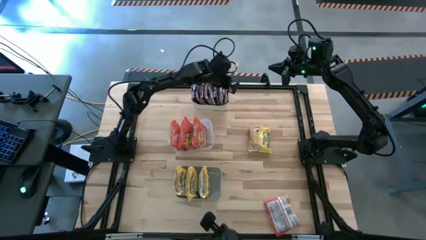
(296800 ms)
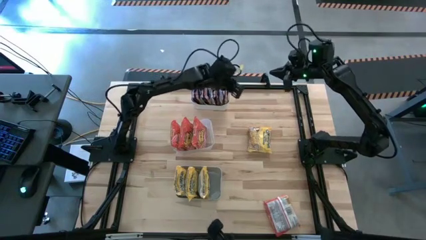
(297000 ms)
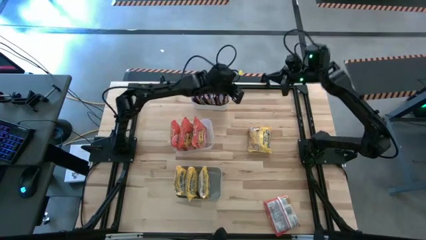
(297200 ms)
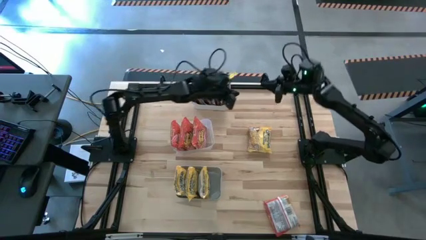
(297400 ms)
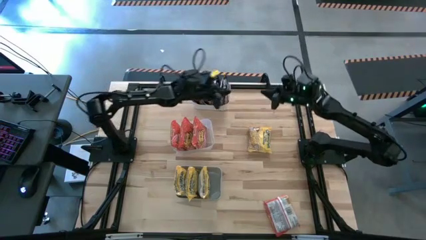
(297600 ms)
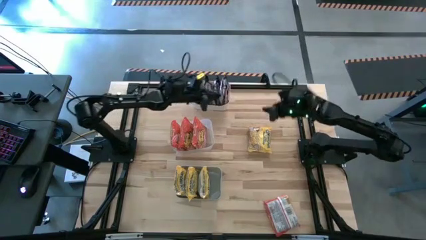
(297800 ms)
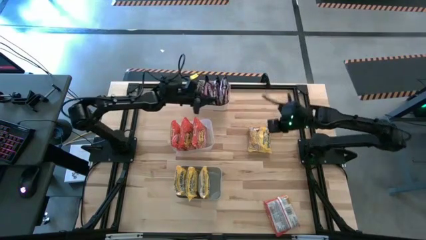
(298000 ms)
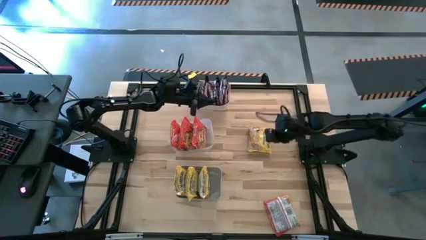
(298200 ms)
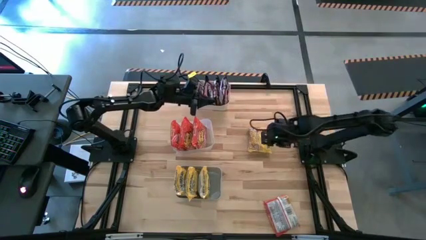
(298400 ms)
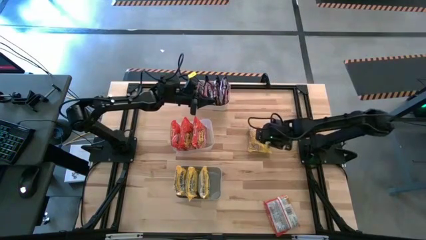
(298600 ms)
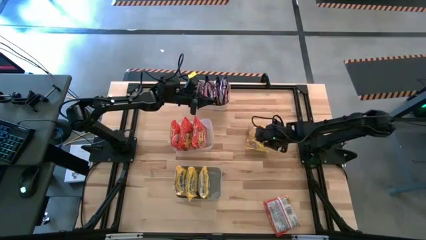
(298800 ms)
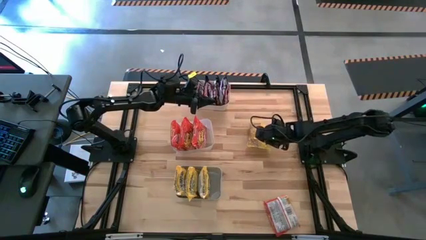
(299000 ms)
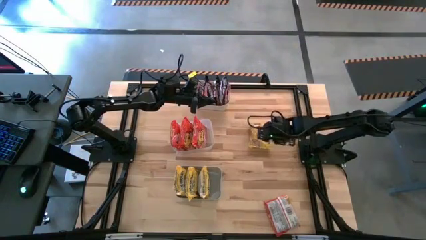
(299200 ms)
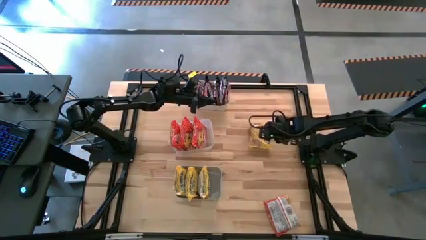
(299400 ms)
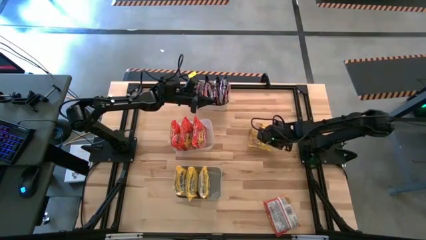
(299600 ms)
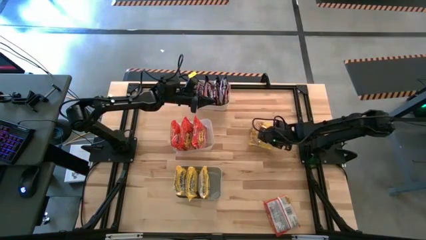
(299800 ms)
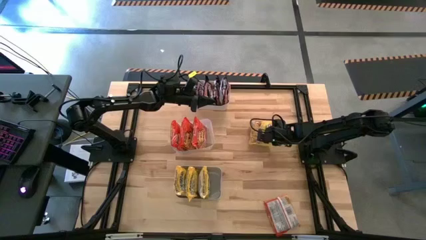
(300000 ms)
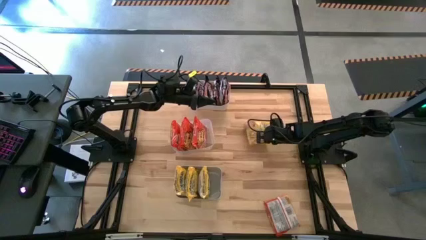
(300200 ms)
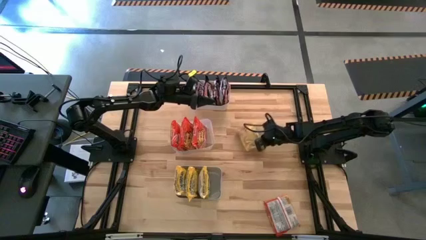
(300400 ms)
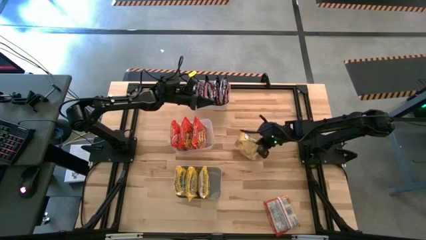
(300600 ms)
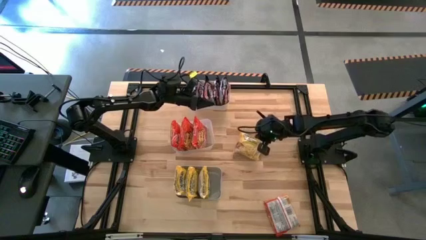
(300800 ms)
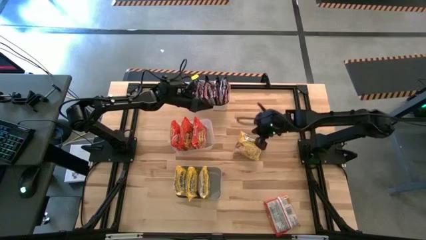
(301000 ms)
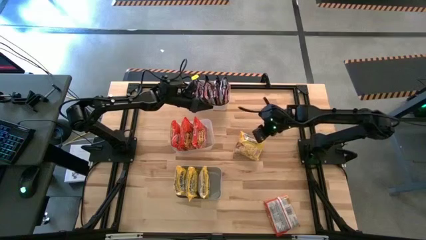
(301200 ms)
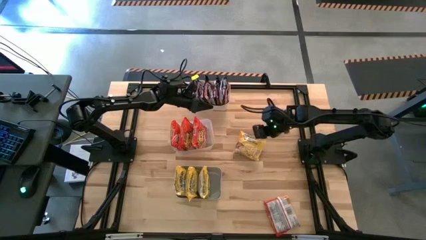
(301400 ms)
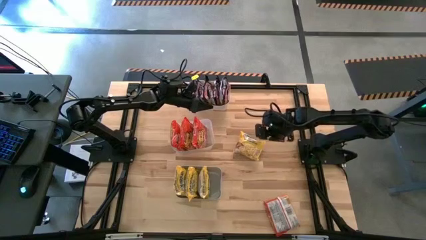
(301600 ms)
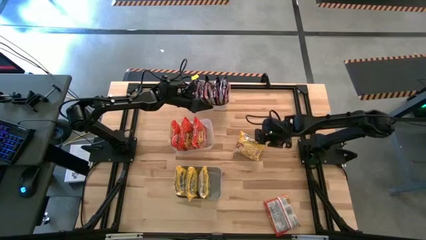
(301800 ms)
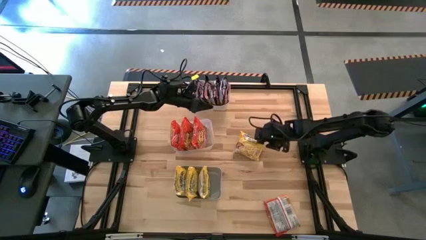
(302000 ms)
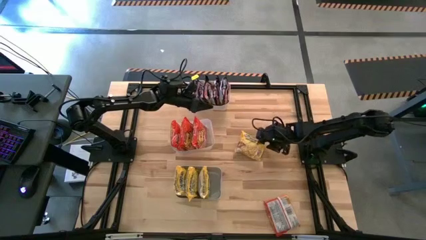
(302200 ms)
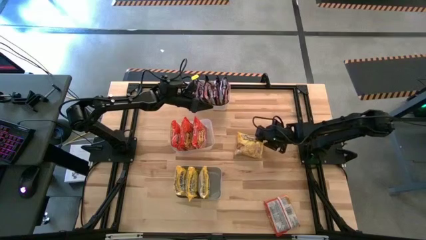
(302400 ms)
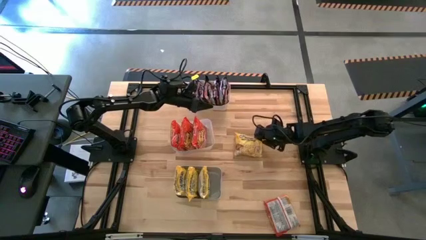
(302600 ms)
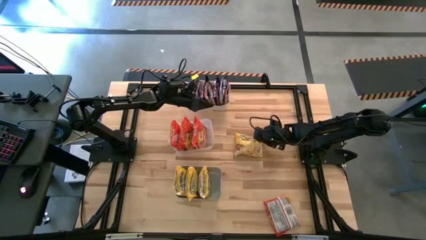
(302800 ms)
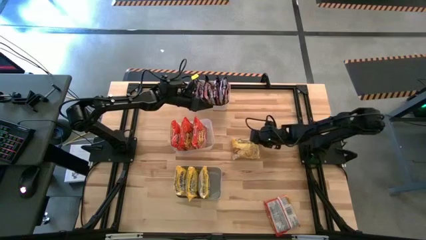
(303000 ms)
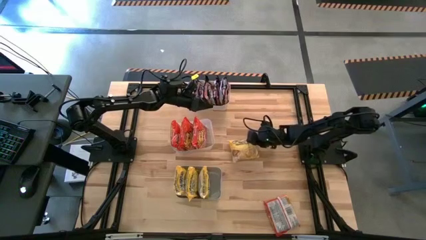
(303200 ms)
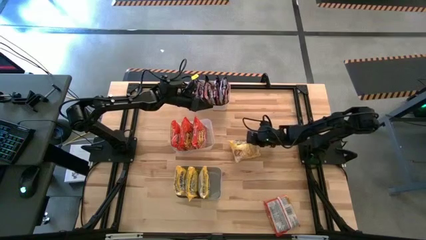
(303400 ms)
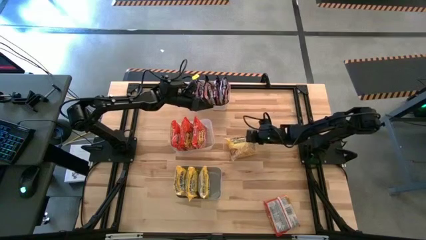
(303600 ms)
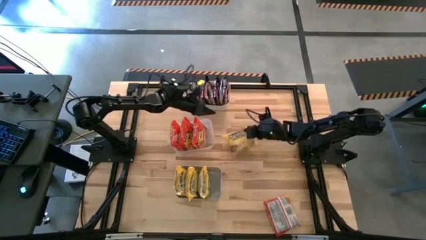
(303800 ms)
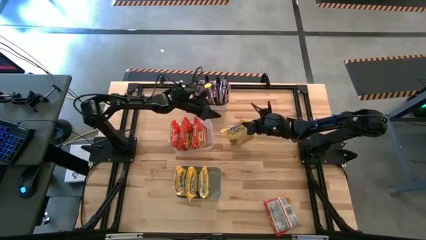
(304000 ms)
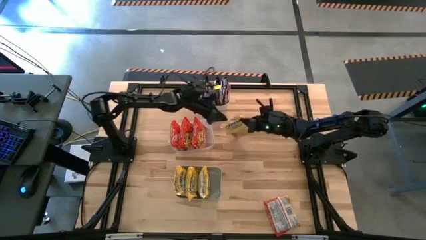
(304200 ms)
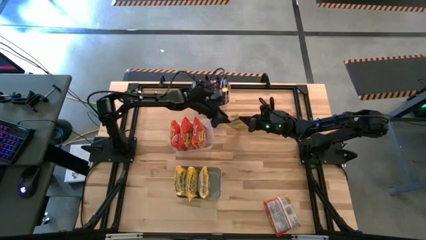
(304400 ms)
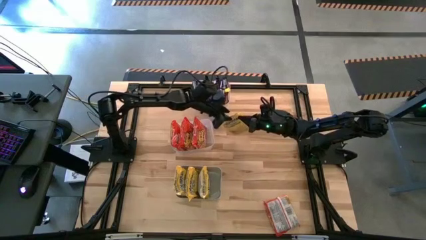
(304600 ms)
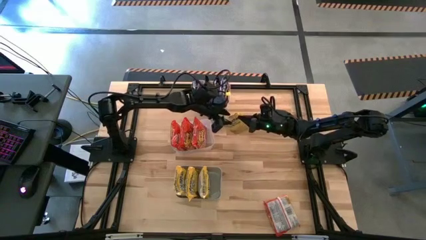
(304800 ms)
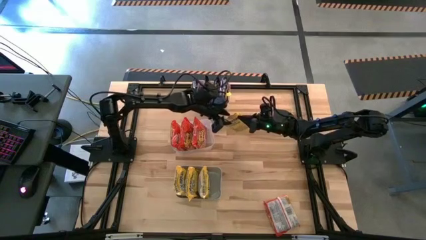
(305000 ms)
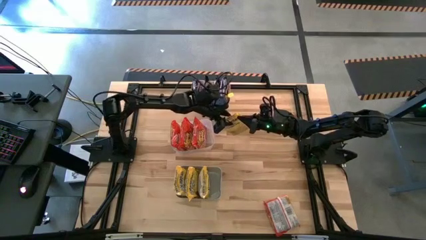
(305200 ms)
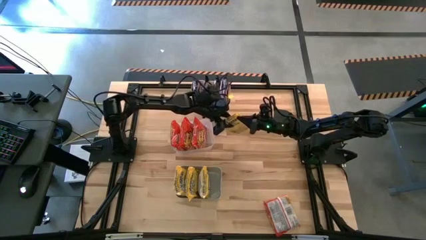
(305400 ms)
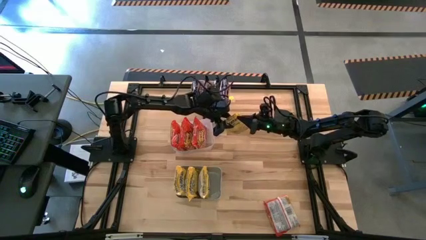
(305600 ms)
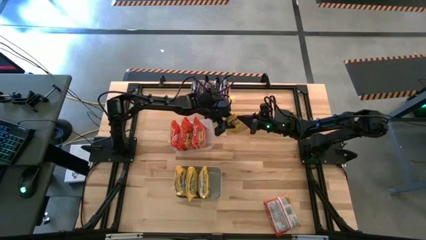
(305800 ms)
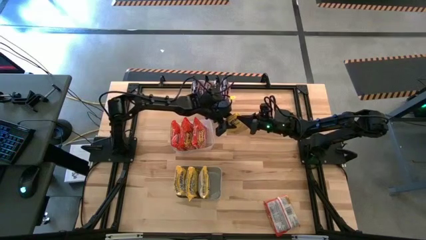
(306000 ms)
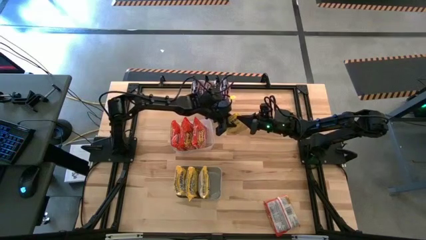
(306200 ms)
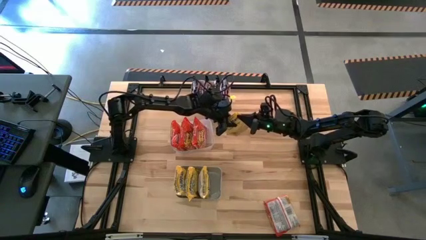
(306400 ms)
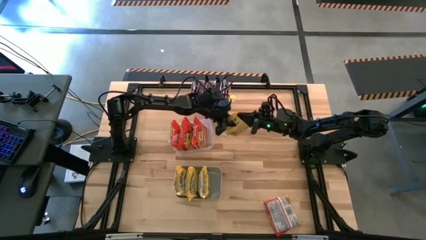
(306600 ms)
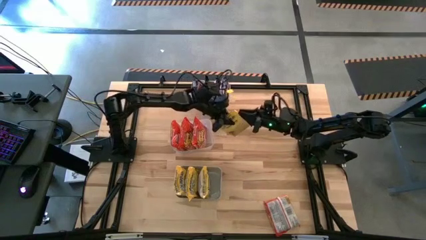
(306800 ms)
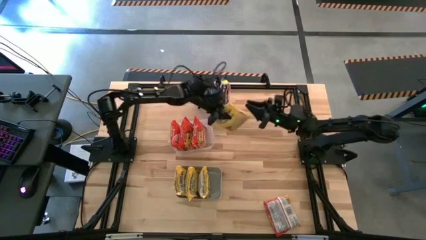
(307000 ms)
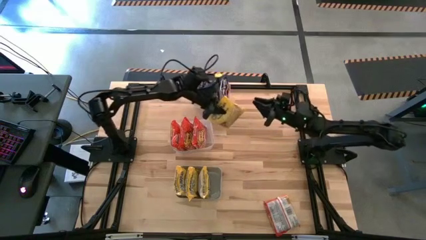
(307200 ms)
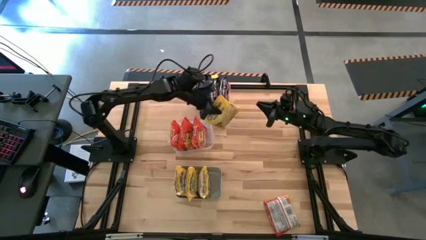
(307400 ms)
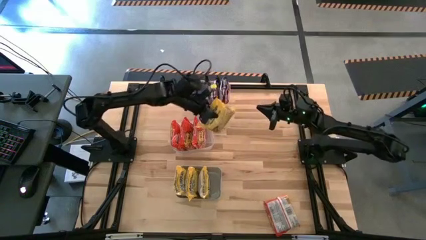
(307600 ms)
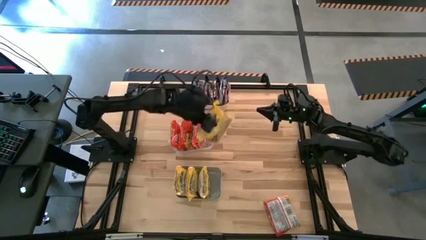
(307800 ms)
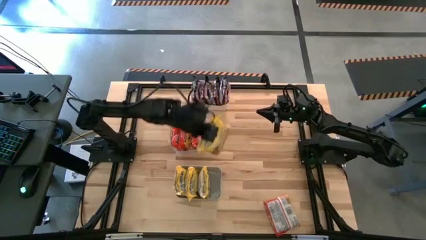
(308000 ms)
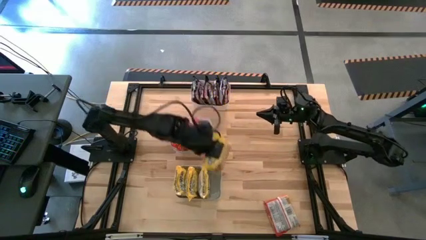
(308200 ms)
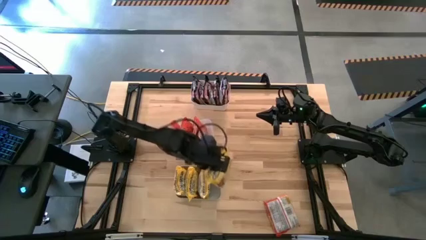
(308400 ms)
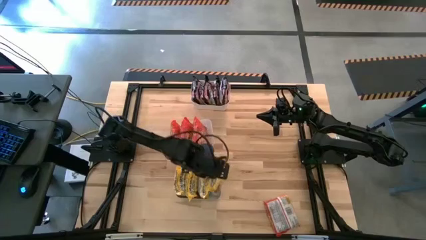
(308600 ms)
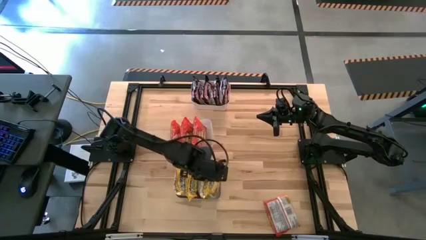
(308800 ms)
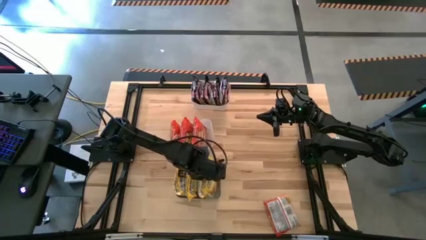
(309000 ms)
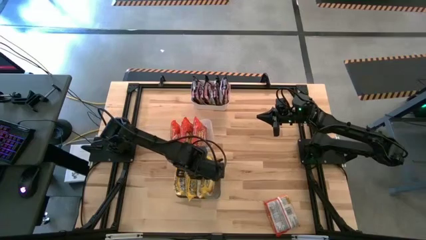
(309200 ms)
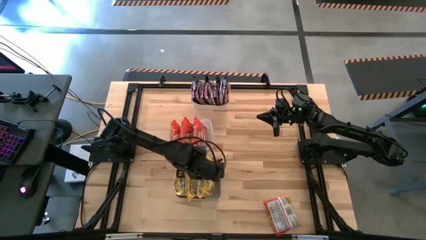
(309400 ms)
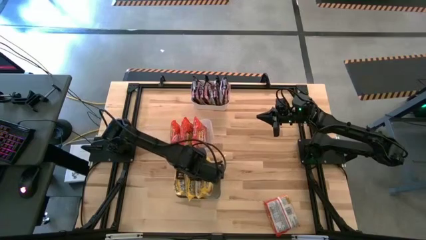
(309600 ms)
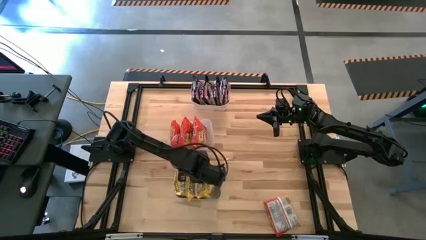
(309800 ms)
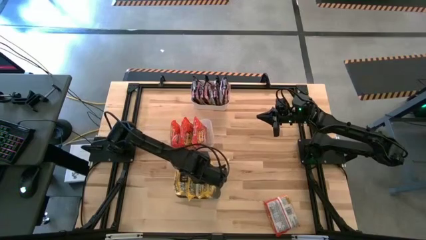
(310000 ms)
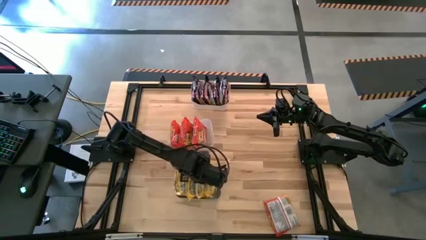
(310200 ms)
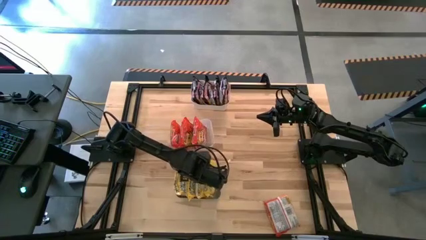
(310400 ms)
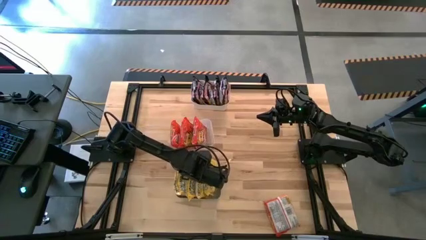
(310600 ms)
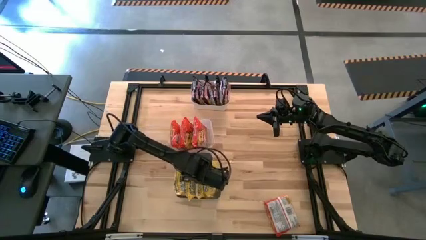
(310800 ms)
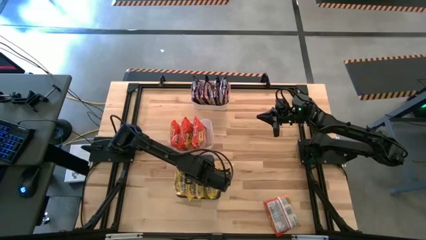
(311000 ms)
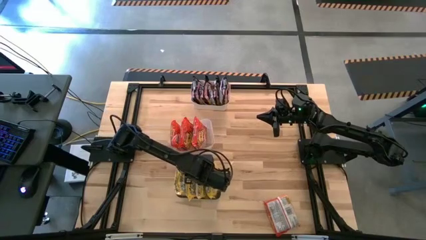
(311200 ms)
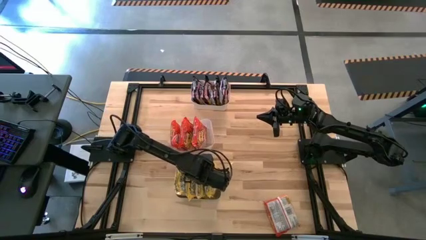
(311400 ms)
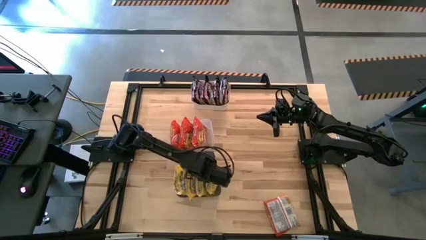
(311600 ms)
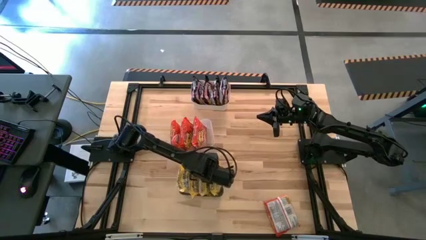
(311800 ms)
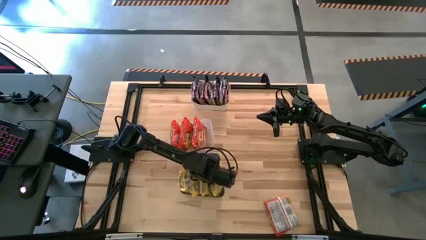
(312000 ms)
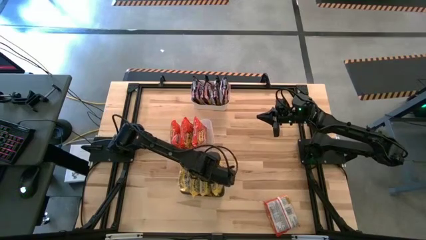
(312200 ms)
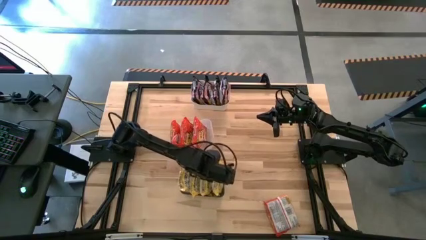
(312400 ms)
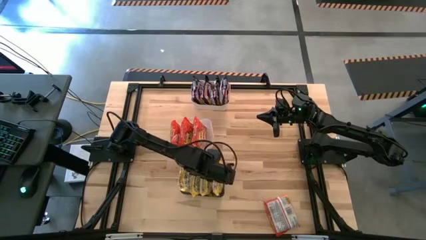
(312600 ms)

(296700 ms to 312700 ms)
Task: Sort Maruchan noodles
Put the yellow noodle pack into the gray bin
